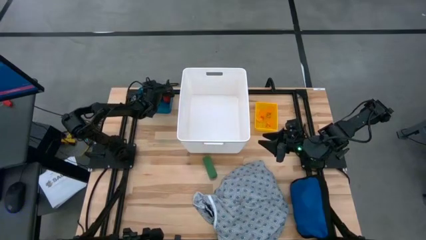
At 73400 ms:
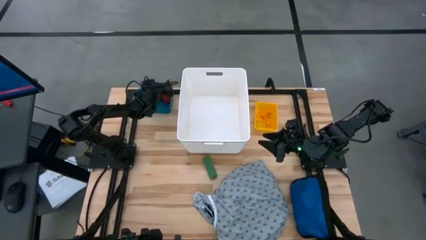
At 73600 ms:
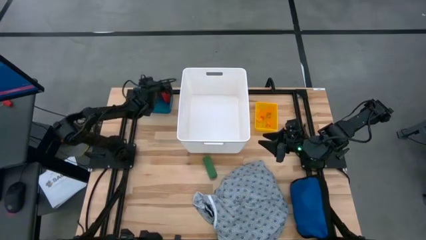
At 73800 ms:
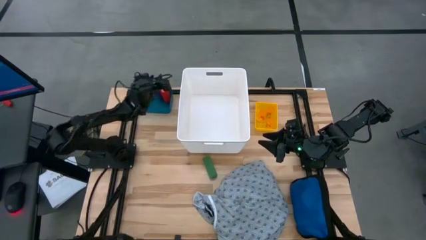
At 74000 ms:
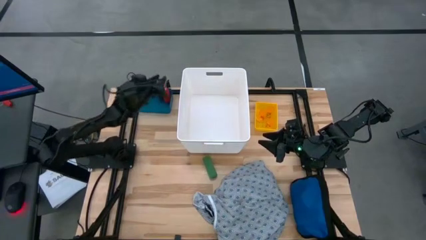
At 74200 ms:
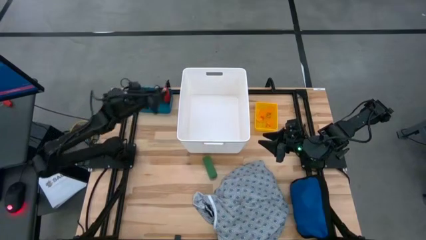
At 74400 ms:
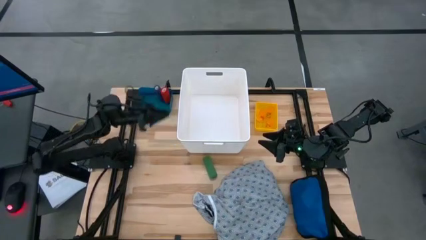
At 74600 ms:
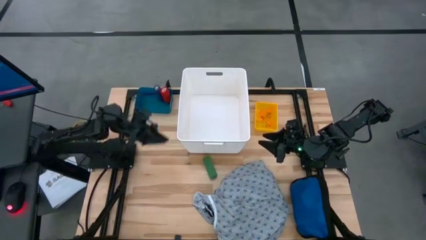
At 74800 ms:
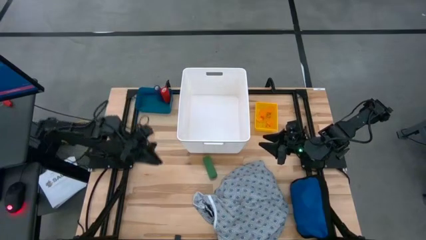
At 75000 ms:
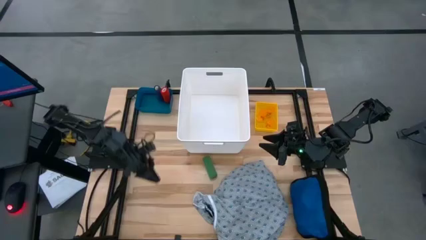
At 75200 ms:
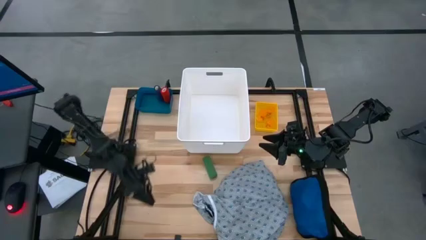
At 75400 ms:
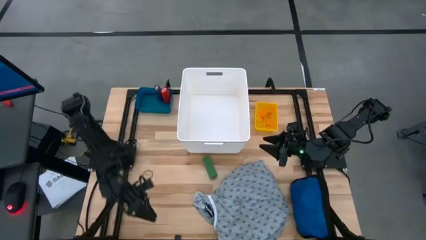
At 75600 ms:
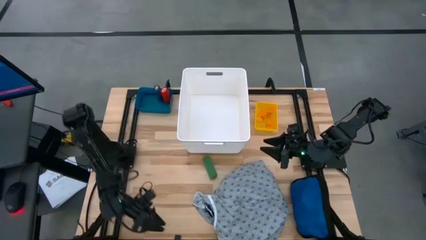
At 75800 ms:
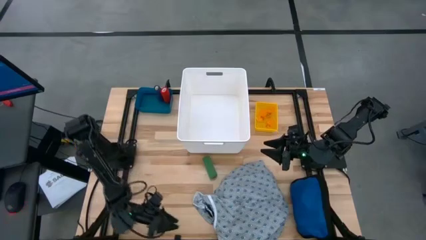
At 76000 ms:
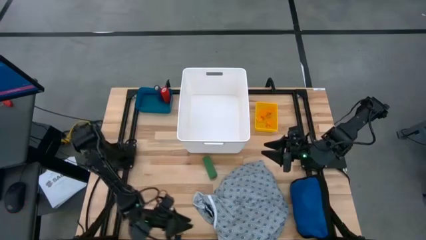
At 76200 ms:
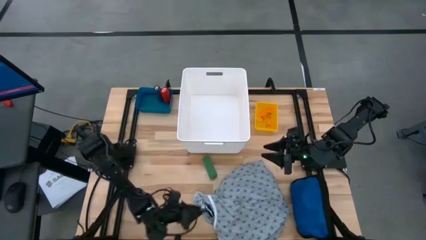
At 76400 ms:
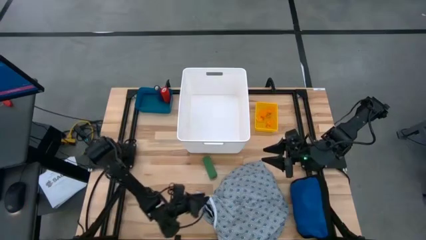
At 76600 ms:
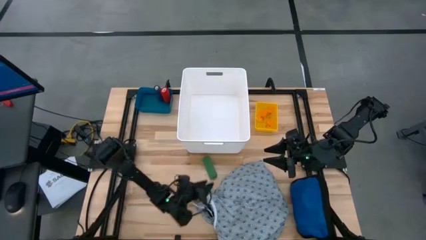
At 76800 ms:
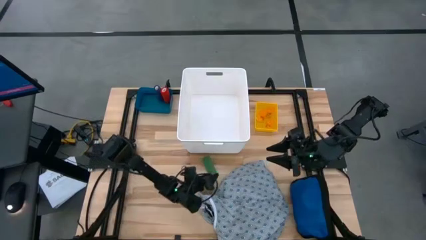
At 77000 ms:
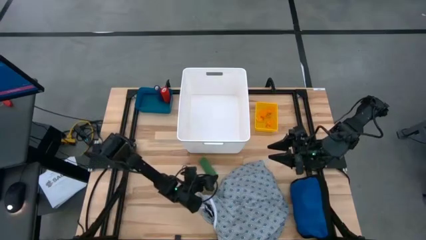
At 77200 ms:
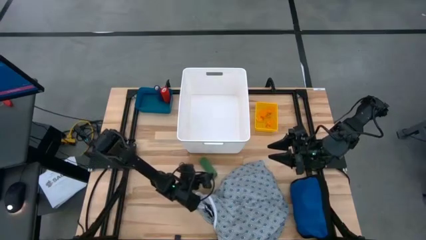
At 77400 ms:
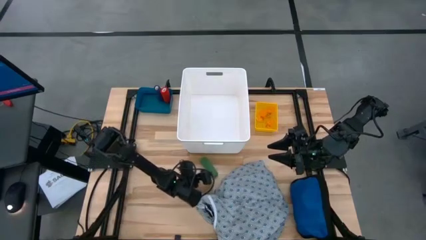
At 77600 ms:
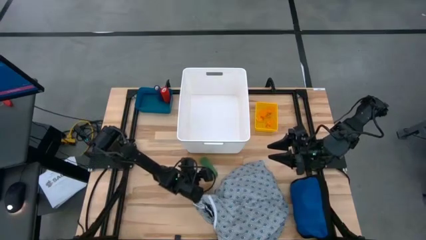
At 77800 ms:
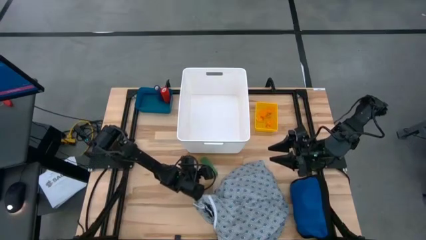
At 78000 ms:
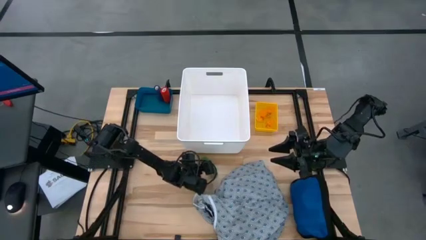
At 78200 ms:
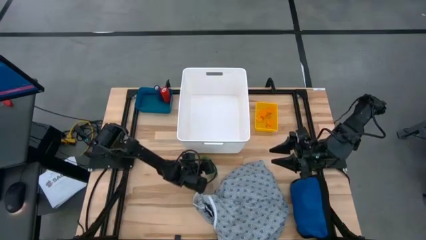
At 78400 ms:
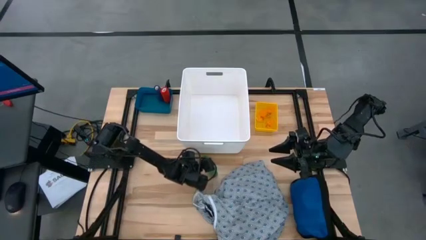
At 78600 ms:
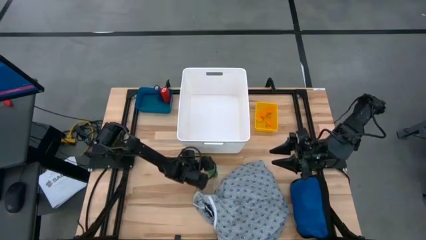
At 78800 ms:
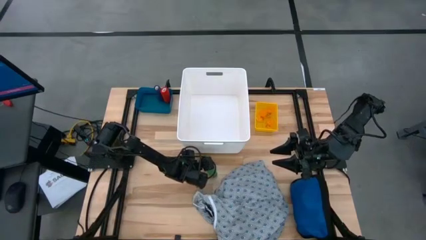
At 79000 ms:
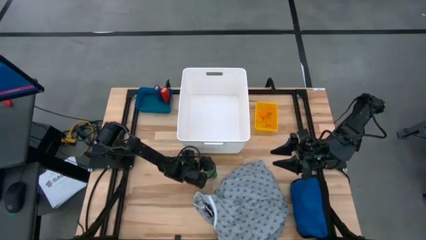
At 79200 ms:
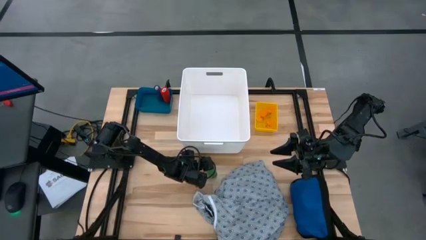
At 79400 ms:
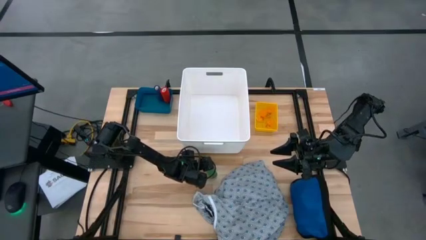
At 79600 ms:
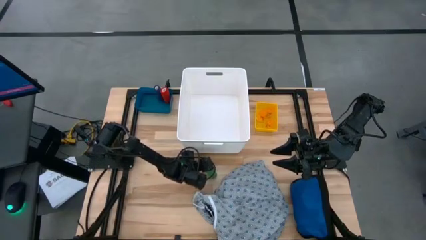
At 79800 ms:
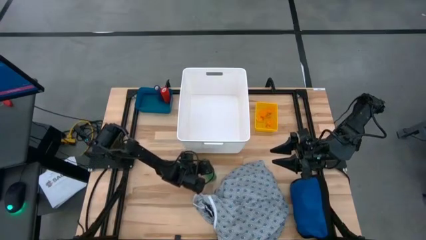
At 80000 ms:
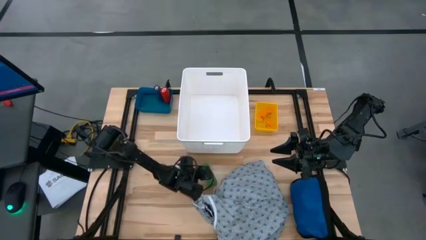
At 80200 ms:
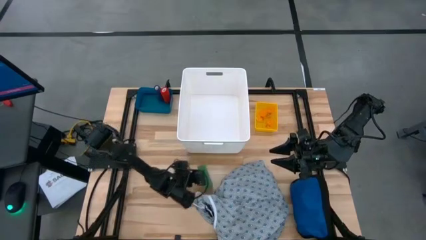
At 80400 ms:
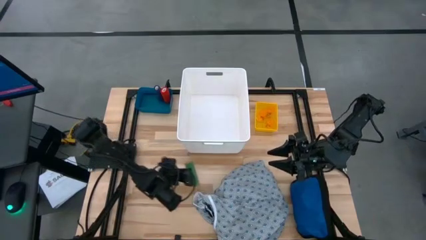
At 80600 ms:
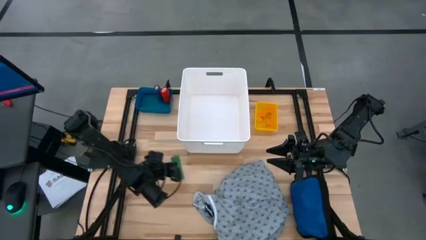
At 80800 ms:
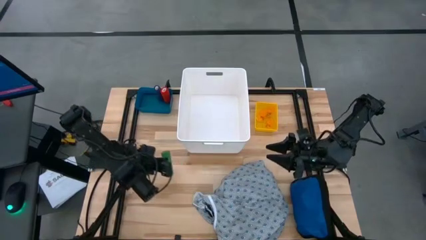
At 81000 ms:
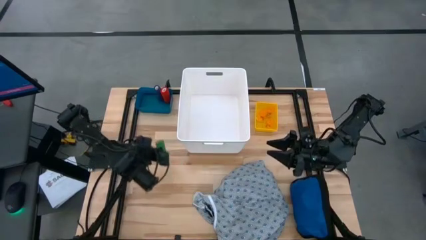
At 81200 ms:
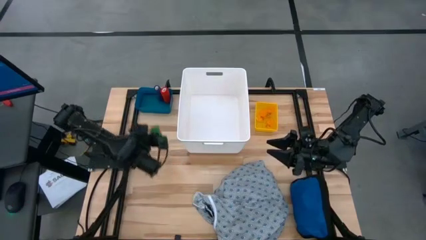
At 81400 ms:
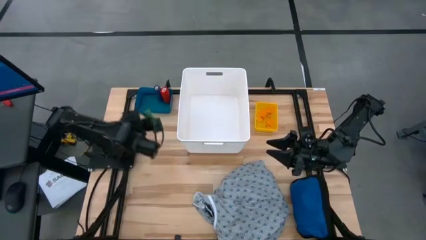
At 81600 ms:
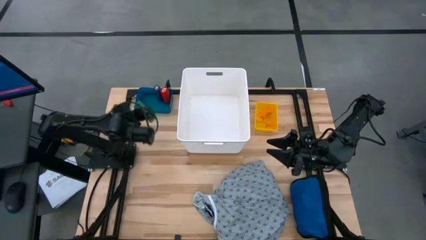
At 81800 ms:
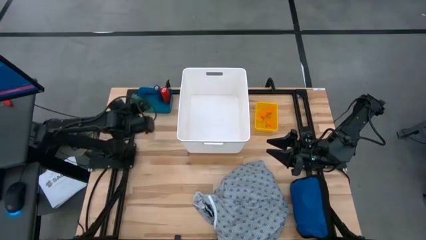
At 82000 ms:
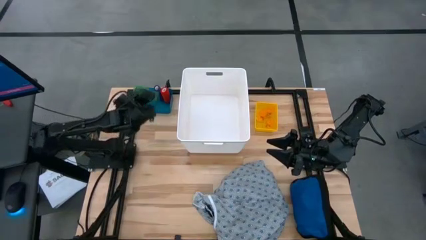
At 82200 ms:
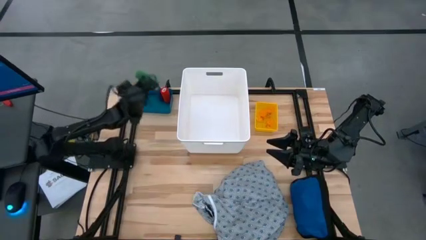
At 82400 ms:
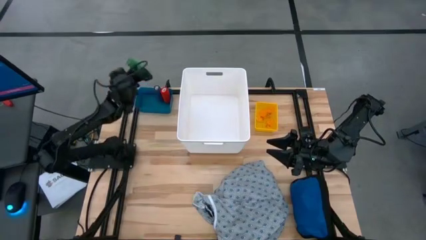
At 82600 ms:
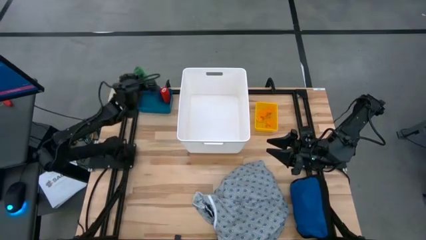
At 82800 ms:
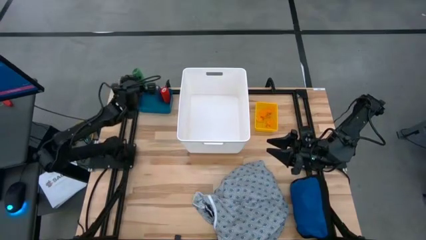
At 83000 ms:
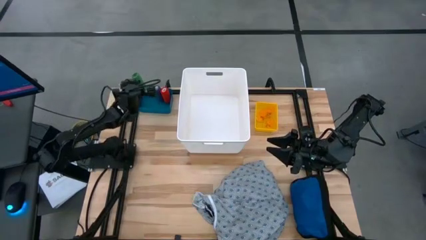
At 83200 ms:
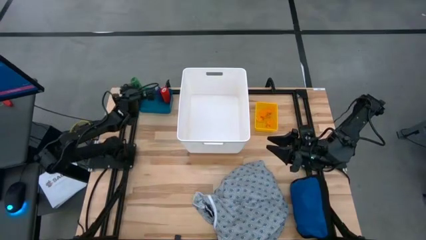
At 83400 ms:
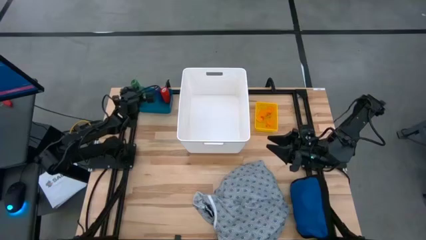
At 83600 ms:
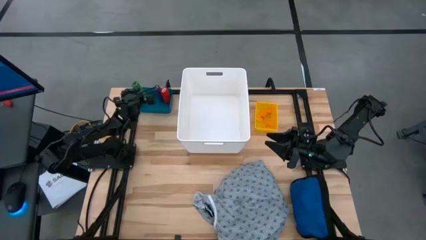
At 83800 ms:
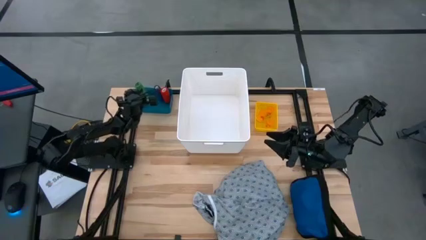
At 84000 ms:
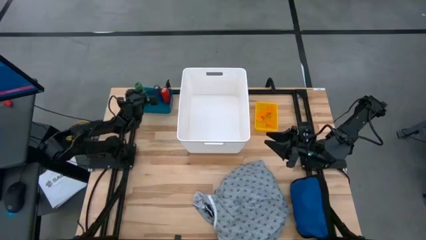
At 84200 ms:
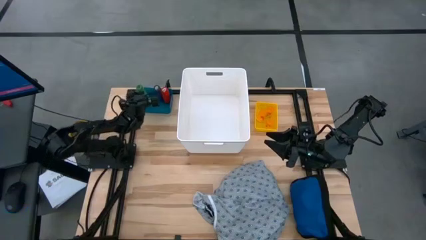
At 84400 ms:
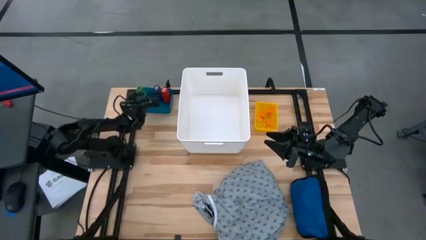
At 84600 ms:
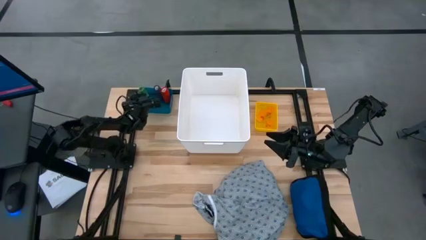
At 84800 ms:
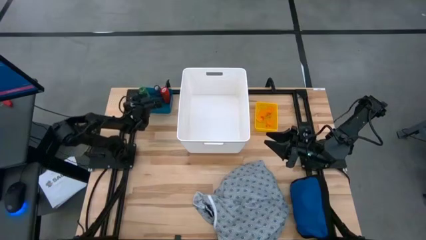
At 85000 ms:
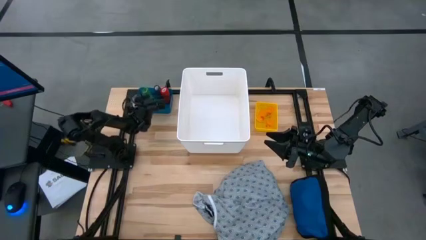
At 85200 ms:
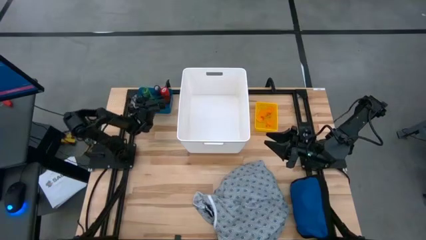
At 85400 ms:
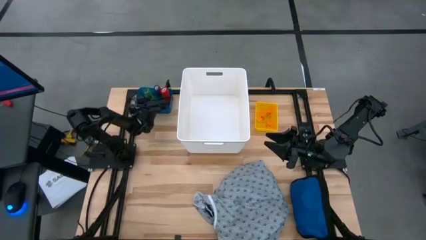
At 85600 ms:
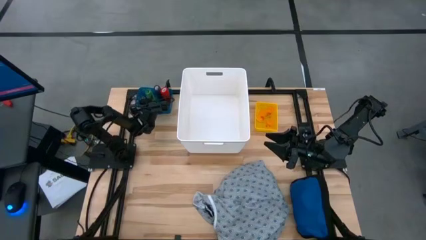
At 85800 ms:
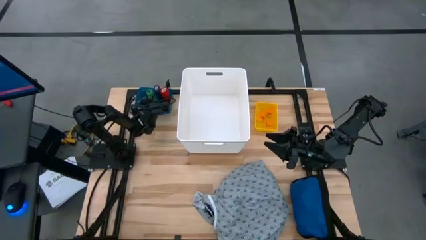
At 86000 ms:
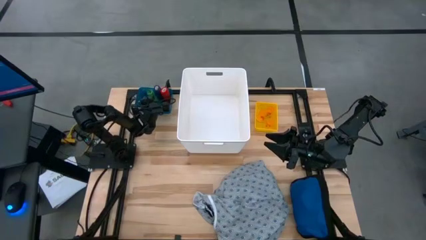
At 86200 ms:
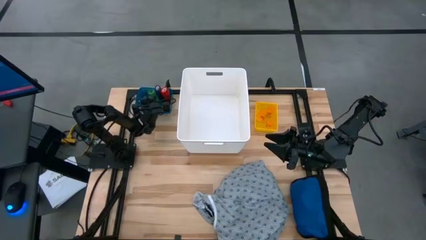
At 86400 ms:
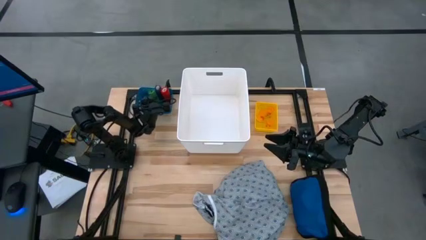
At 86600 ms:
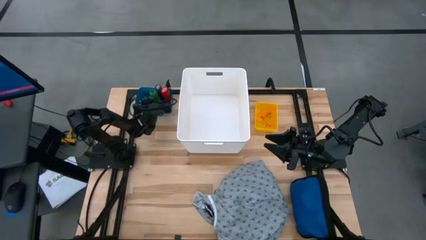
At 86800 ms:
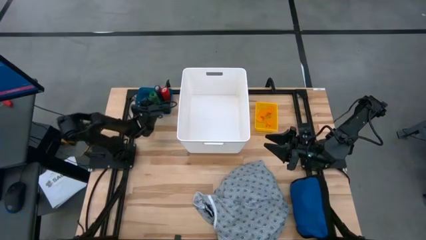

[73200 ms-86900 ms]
Task: Pick & place medical supplies in basket/bin
Put the green bandage into the blue bin

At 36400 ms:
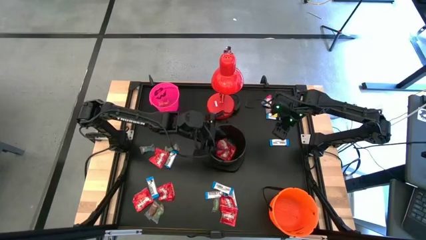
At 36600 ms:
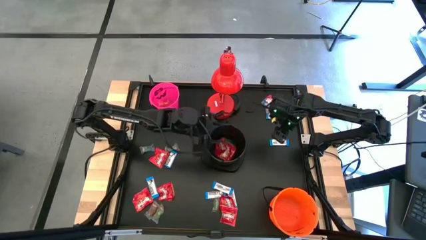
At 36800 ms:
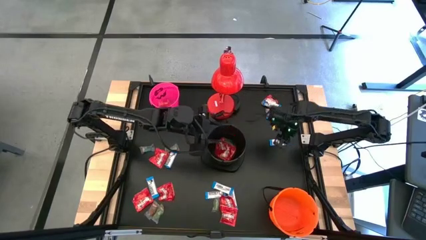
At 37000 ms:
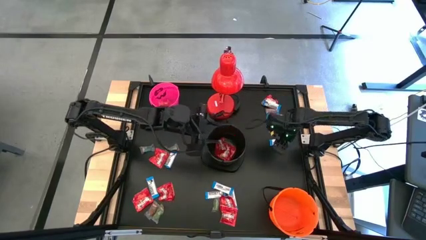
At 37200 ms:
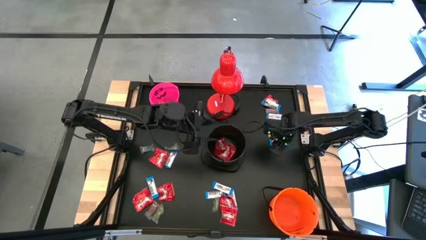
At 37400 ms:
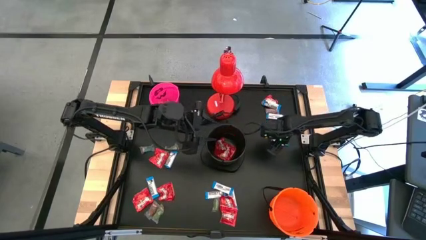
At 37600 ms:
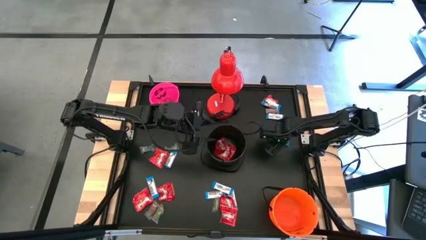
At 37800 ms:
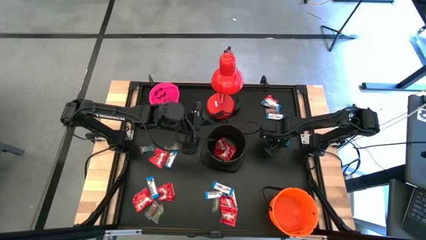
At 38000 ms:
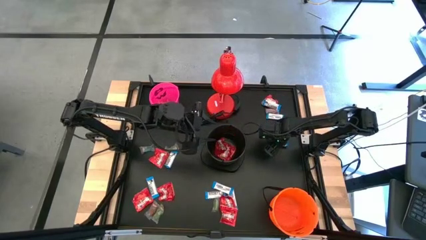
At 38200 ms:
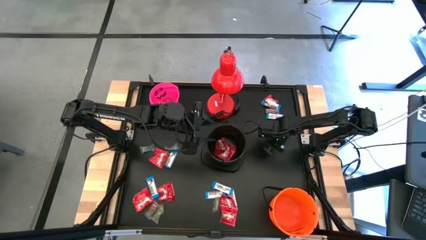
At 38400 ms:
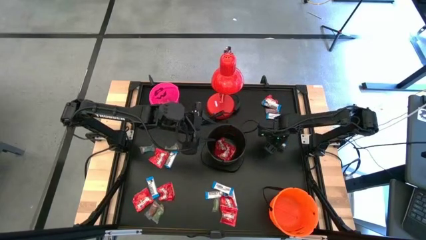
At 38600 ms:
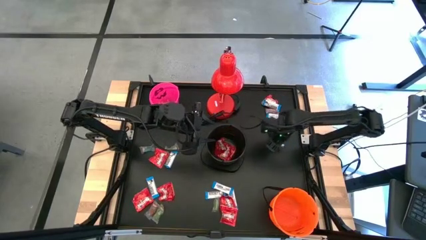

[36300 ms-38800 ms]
Task: Organize candy in baskets
Put the white chocolate into the orange bucket
